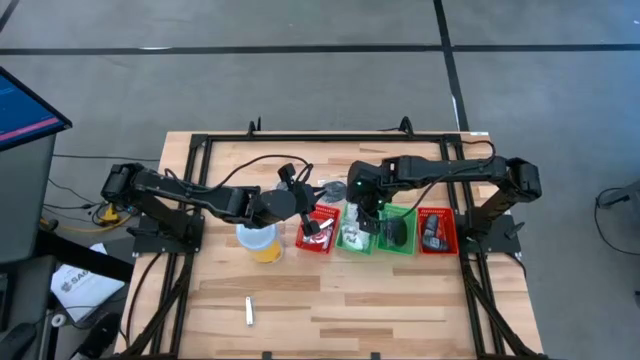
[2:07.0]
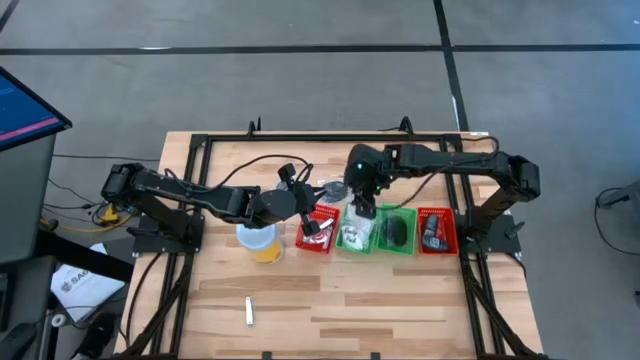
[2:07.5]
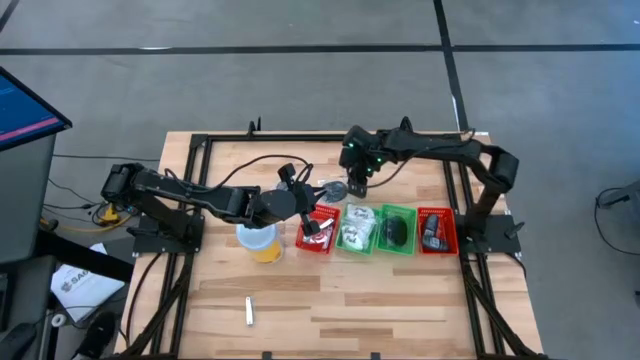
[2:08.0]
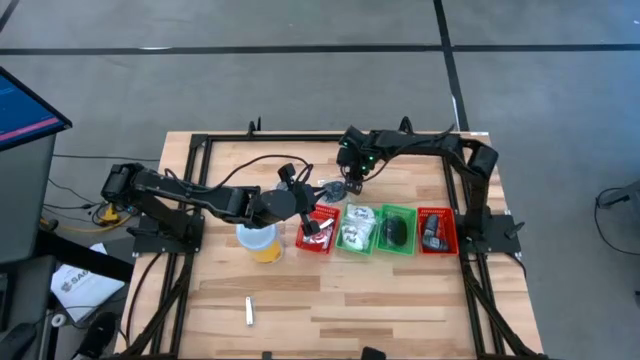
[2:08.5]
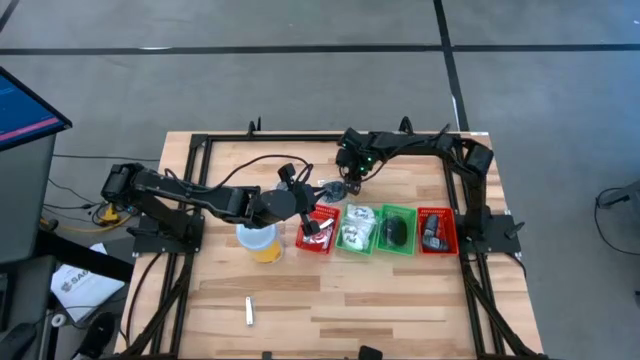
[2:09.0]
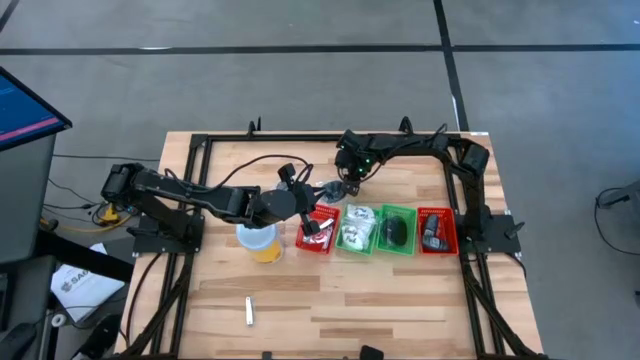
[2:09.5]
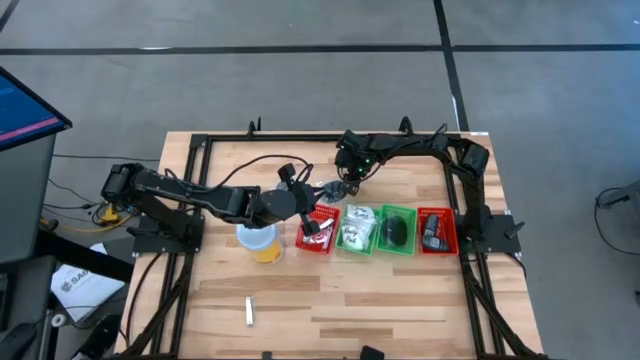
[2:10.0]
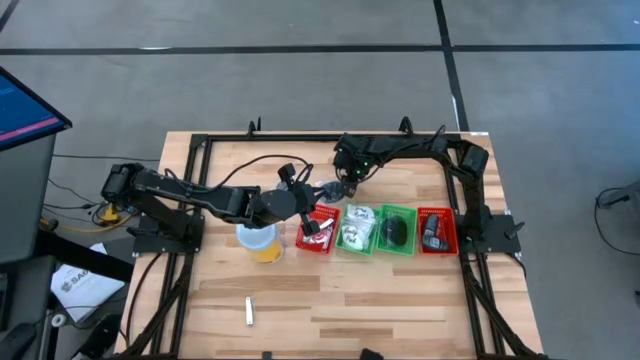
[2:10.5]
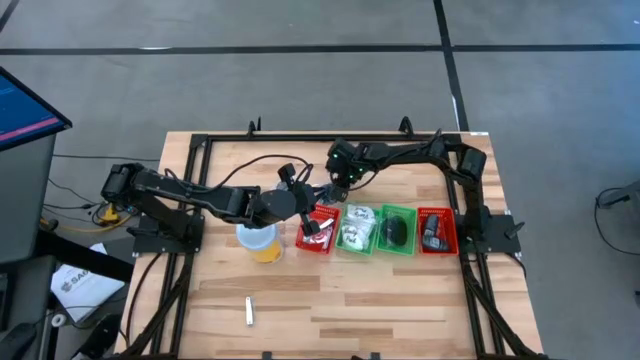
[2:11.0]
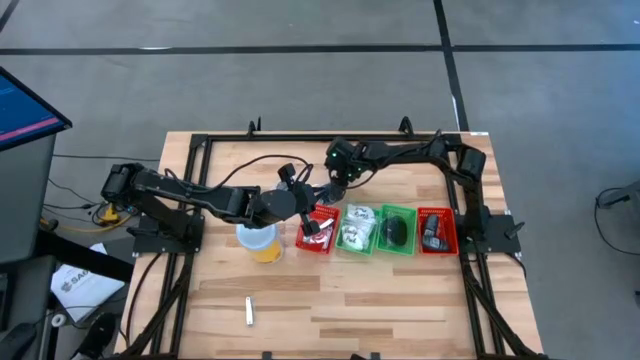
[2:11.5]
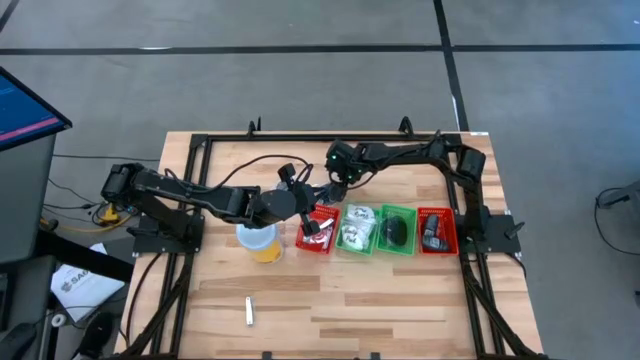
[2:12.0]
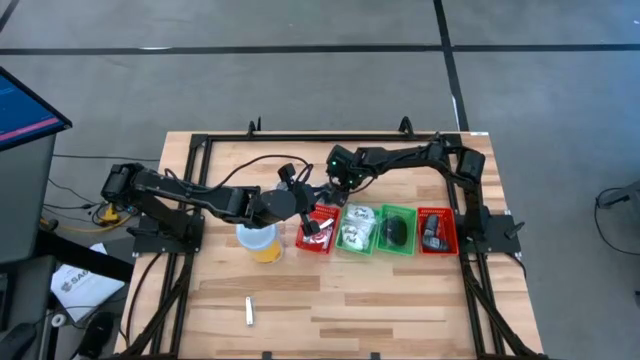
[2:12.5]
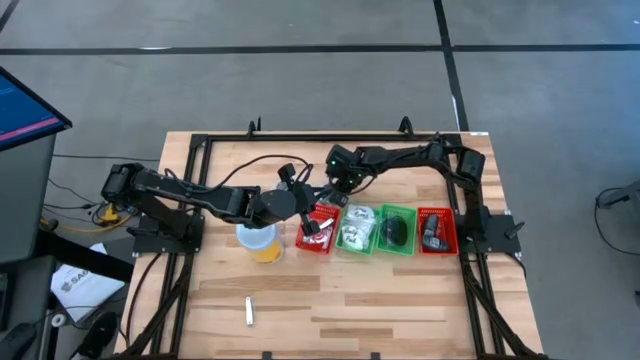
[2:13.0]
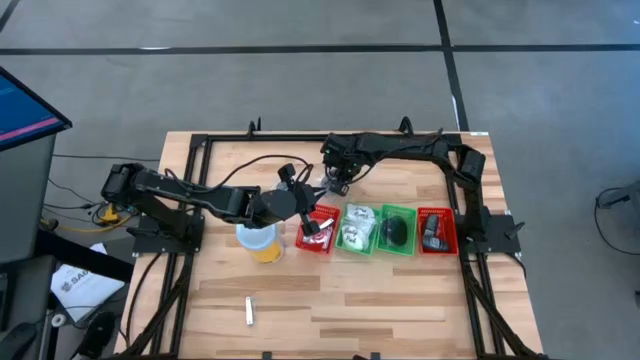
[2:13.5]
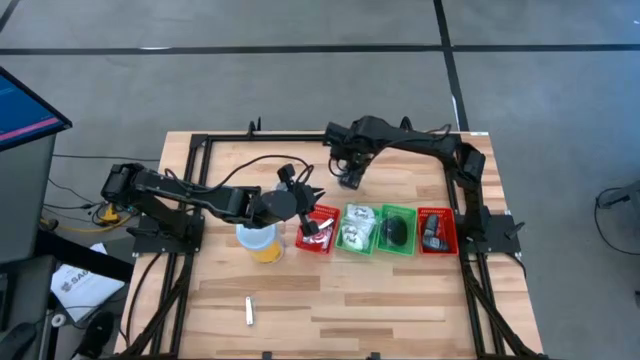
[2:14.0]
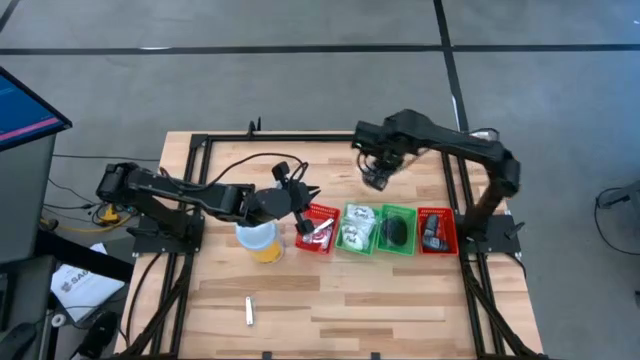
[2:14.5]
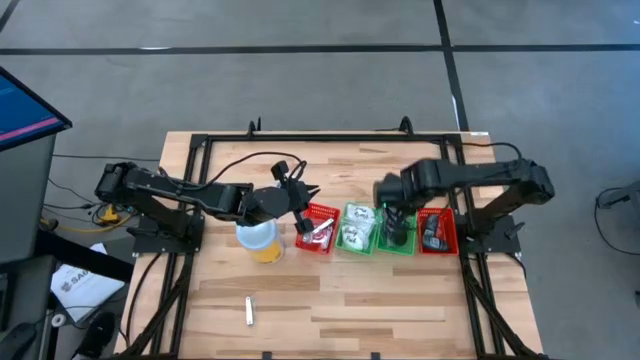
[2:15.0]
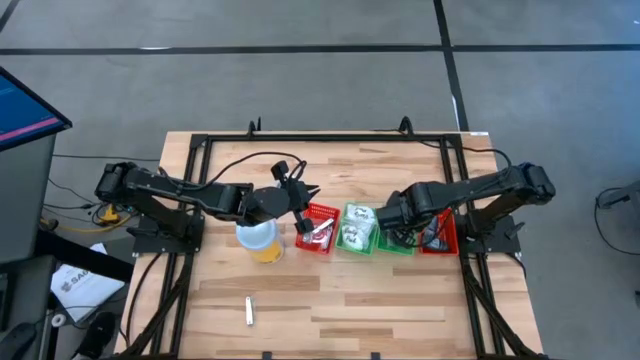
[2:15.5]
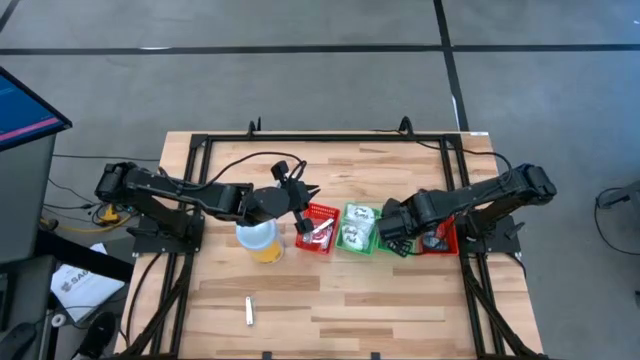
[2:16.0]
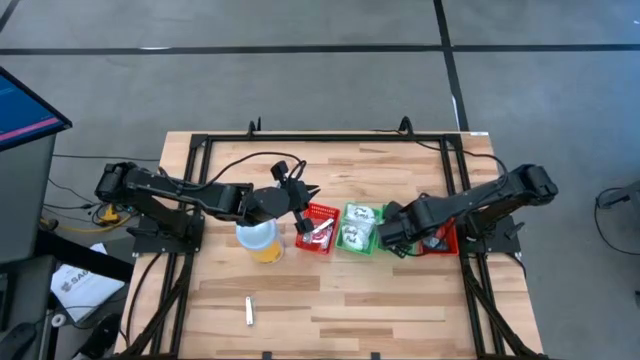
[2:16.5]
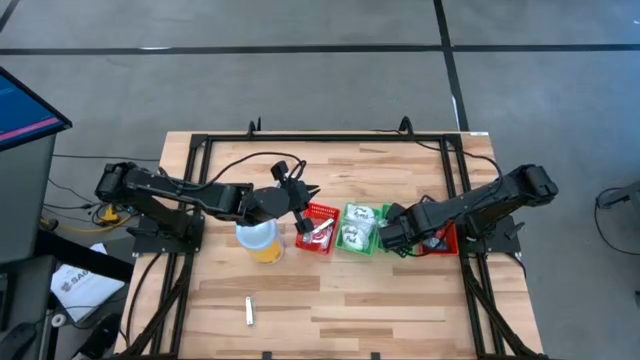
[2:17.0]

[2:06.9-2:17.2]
Task: Pick & Place Travel size toiletries
Put the black hairbrush into the right green bin

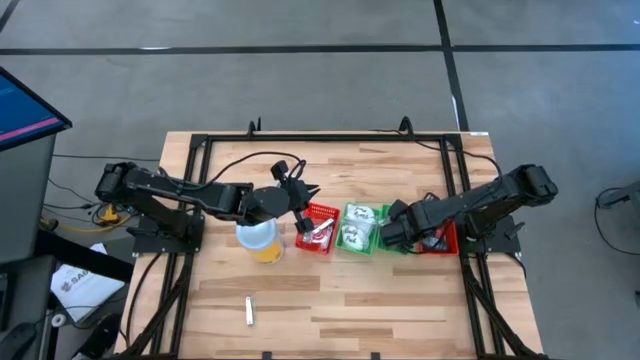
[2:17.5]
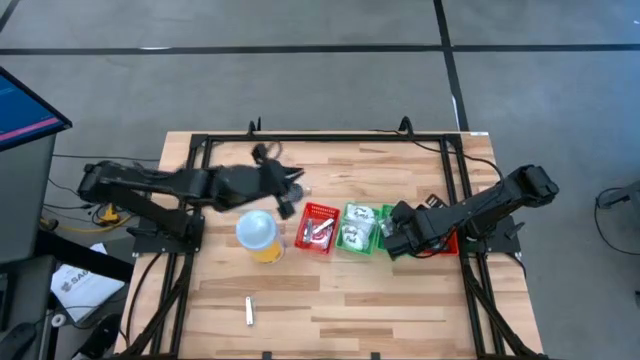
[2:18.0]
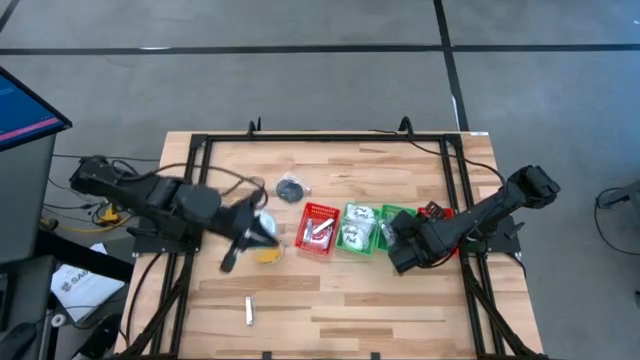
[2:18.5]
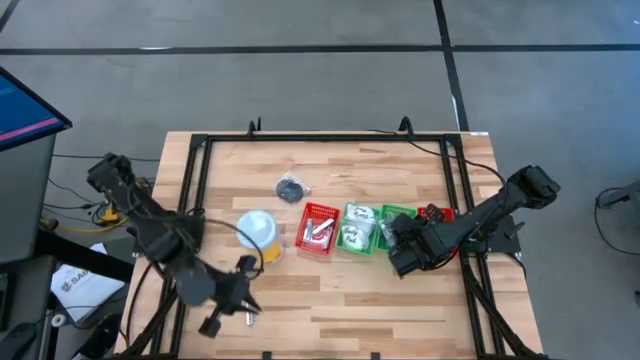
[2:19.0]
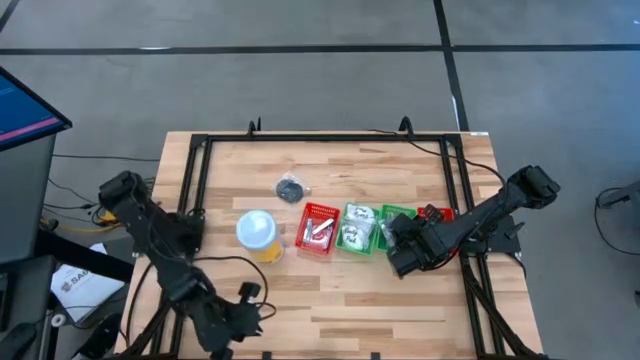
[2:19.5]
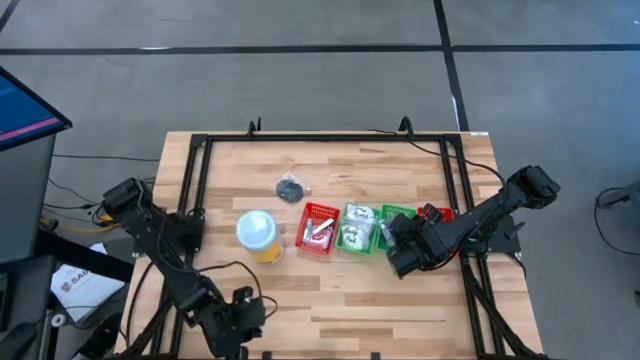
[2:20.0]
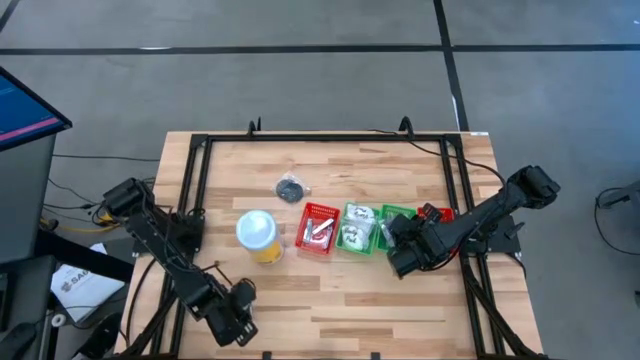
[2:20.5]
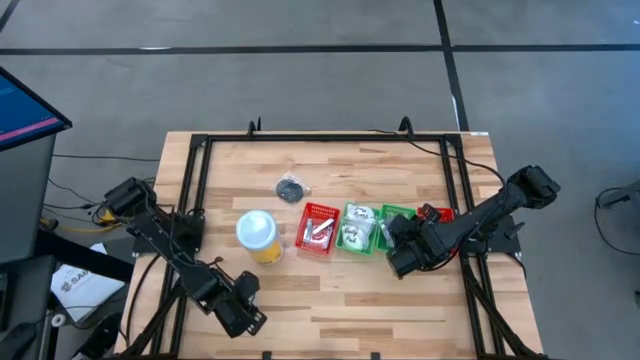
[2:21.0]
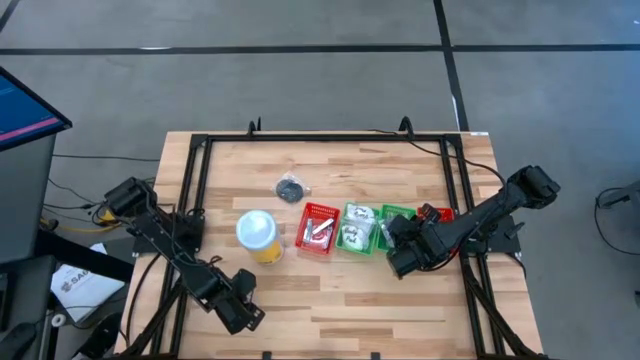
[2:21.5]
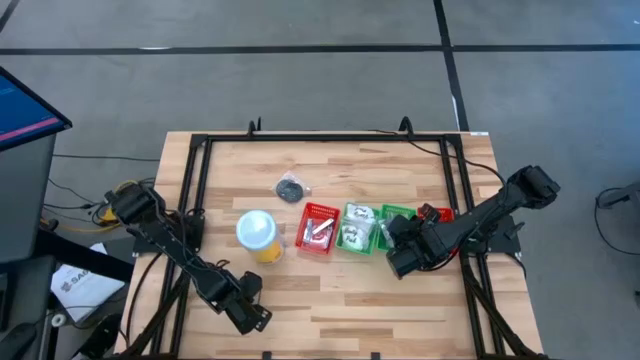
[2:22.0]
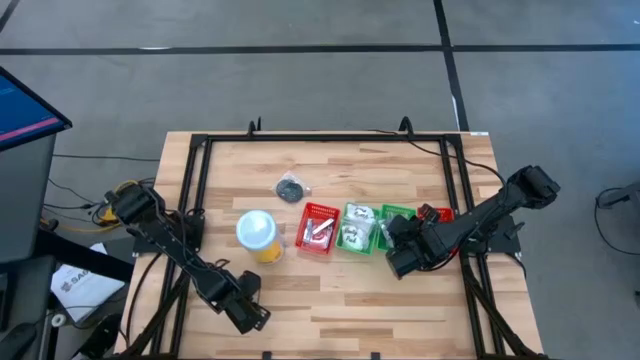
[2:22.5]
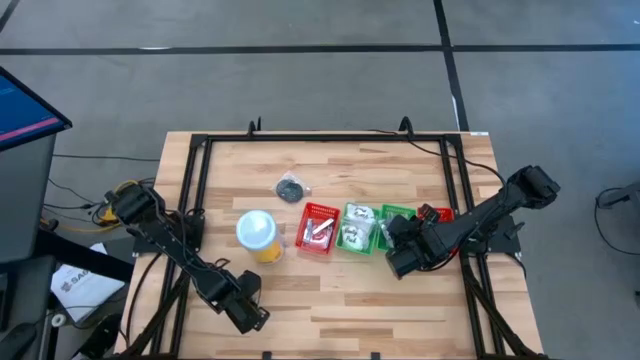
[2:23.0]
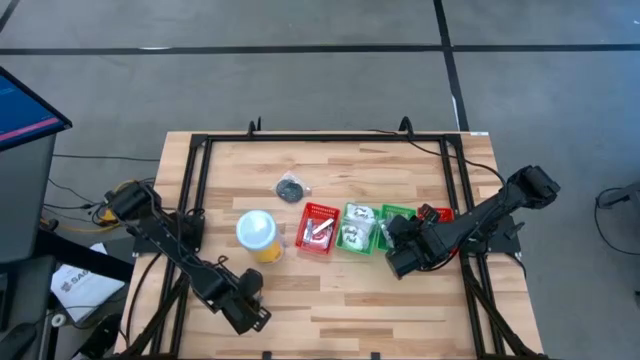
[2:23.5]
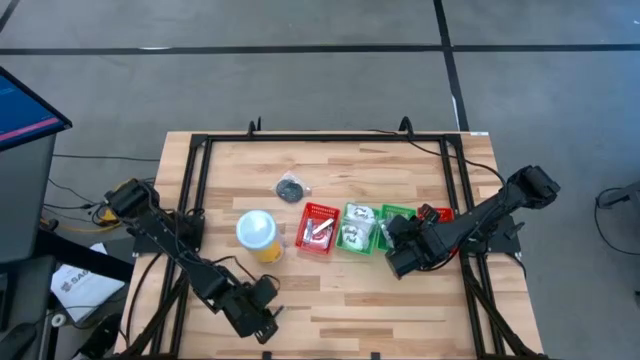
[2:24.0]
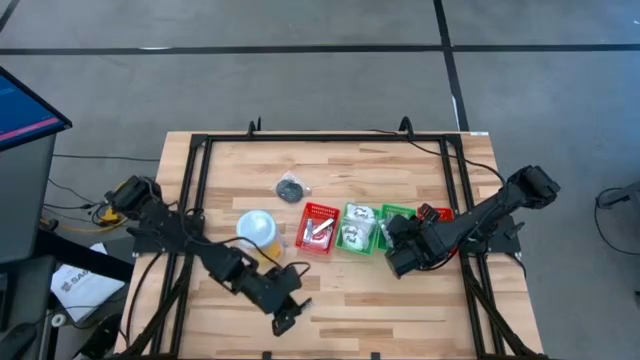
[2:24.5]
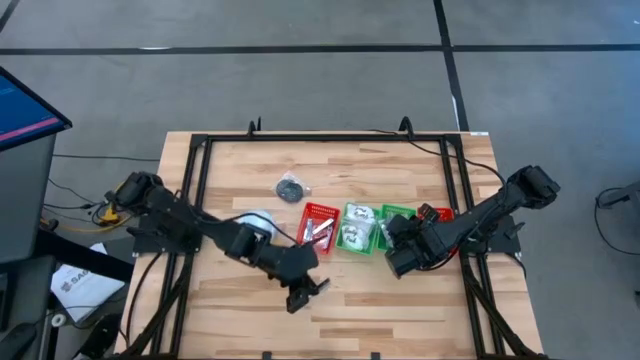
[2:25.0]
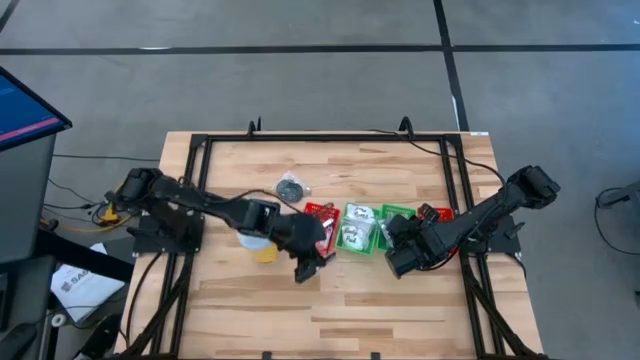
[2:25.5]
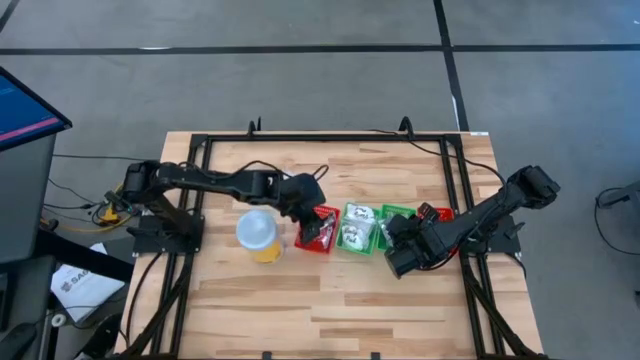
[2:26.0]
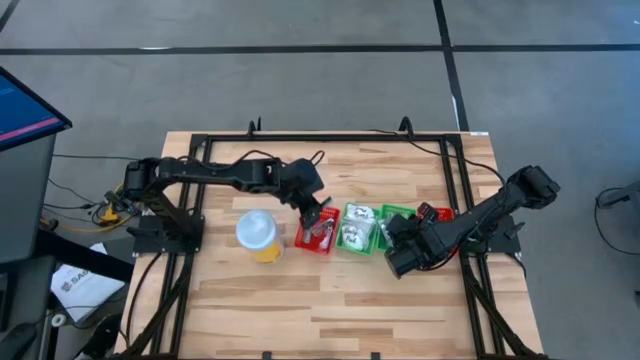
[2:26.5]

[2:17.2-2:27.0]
Put the nail cutter into the left red bin

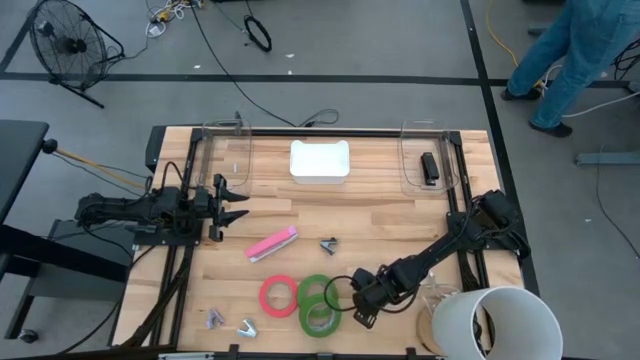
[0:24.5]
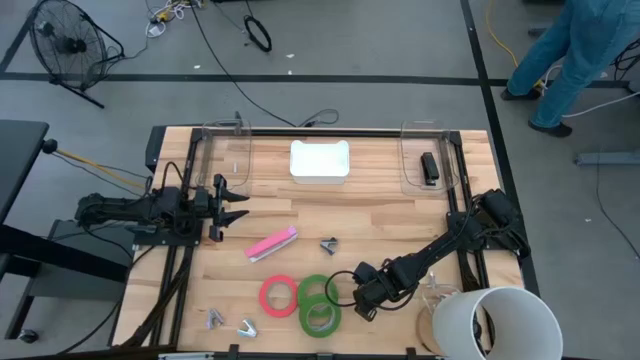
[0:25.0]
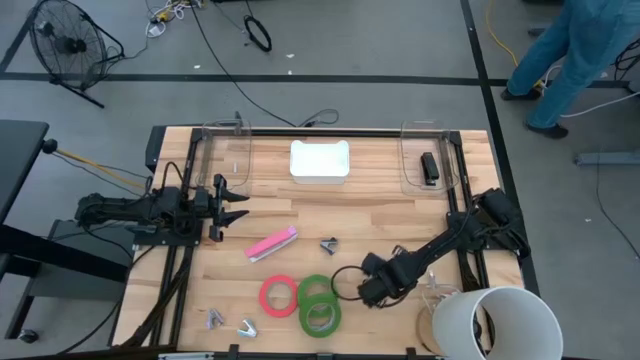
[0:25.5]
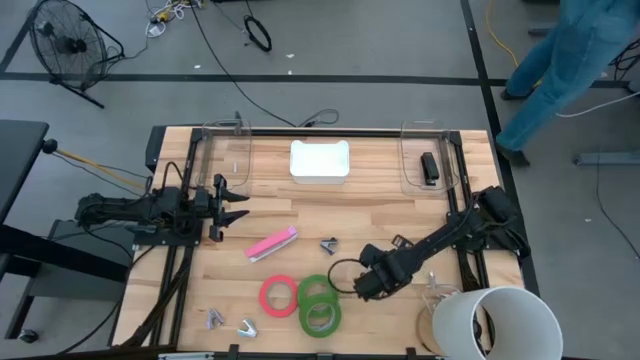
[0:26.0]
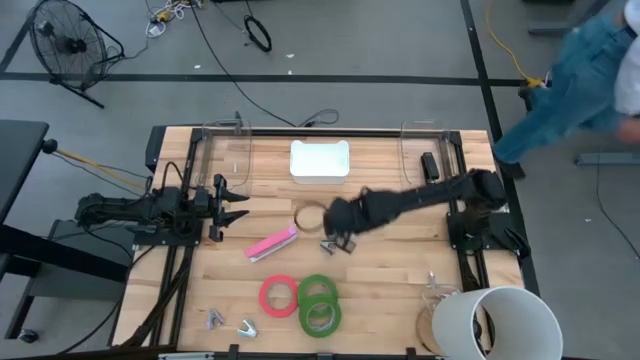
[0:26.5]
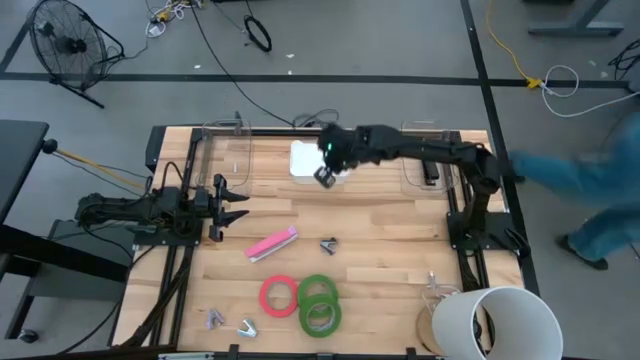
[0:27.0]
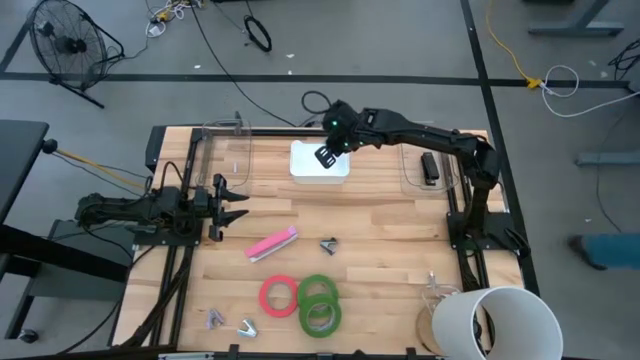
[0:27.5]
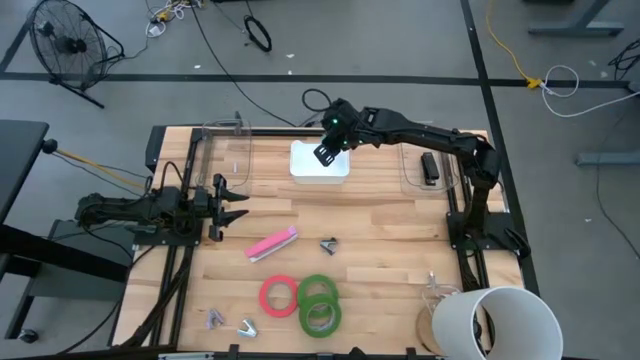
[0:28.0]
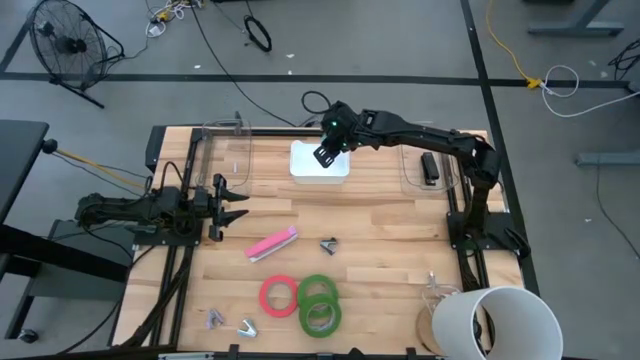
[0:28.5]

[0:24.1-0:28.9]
Task: Pick and place Stapler, Stapler remover, tape
Put the blue staple remover into the white bin
